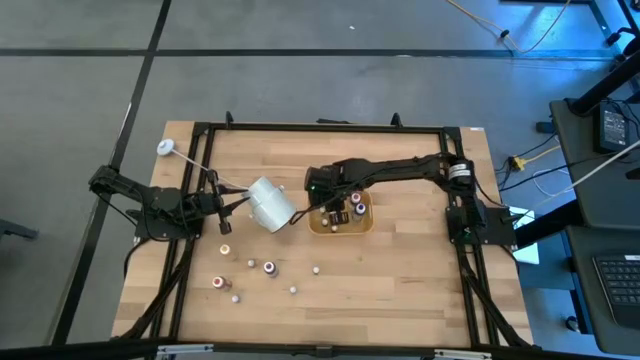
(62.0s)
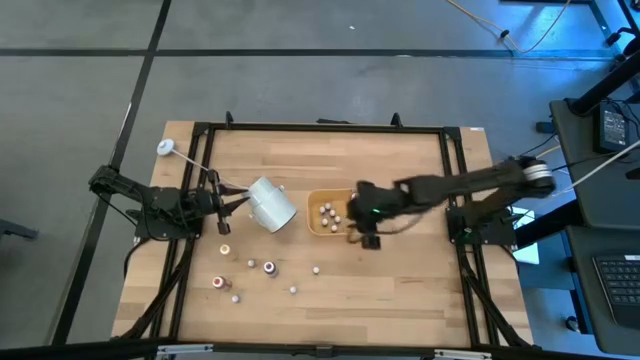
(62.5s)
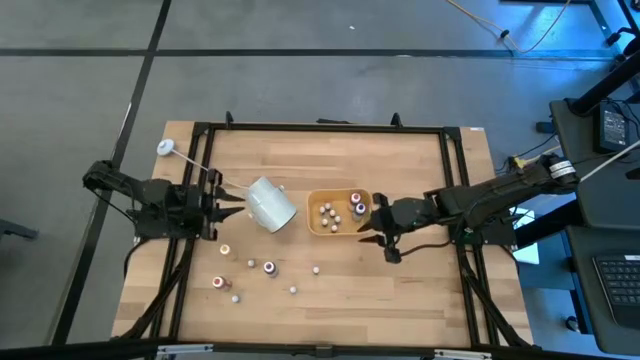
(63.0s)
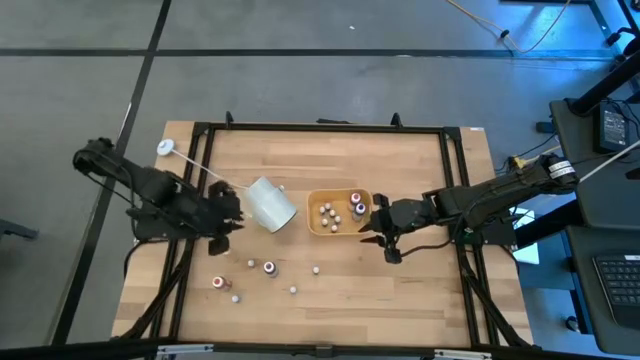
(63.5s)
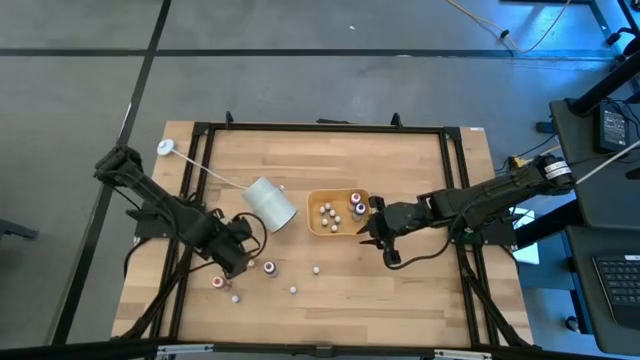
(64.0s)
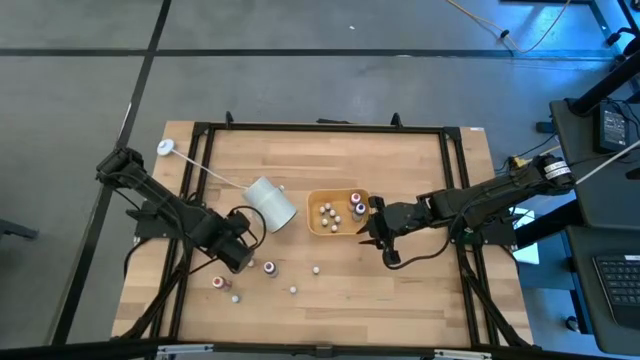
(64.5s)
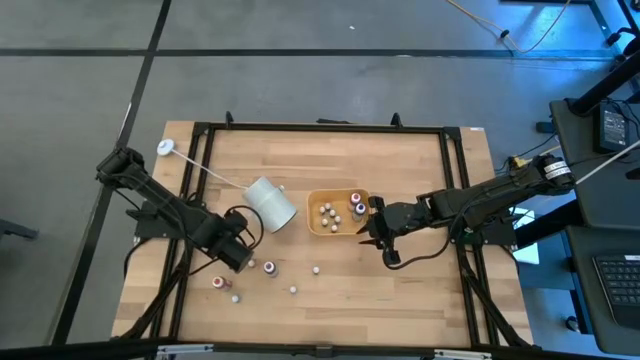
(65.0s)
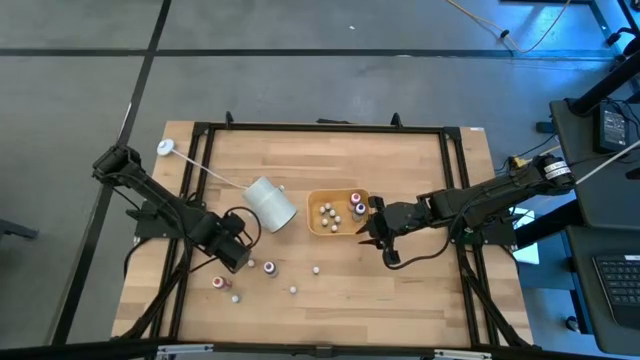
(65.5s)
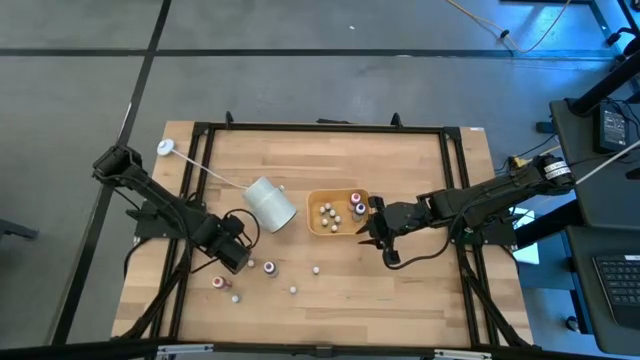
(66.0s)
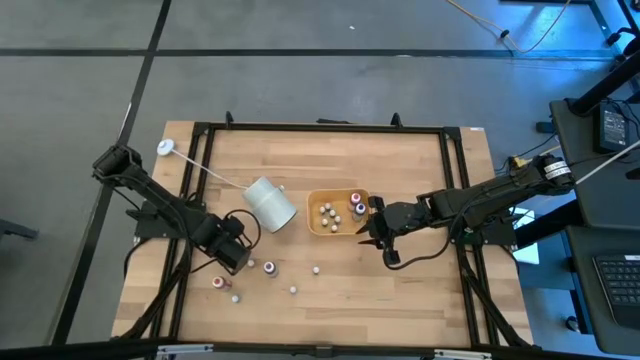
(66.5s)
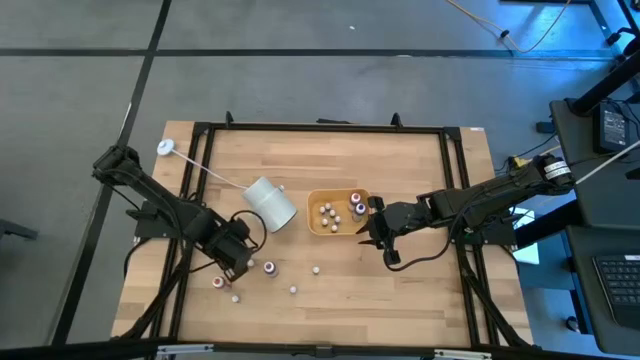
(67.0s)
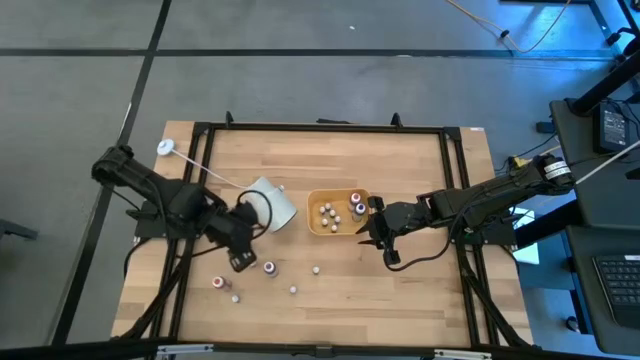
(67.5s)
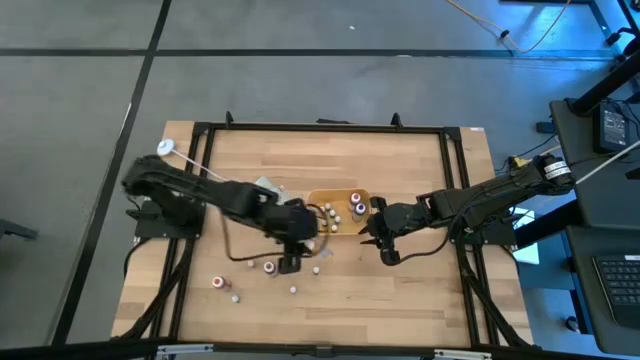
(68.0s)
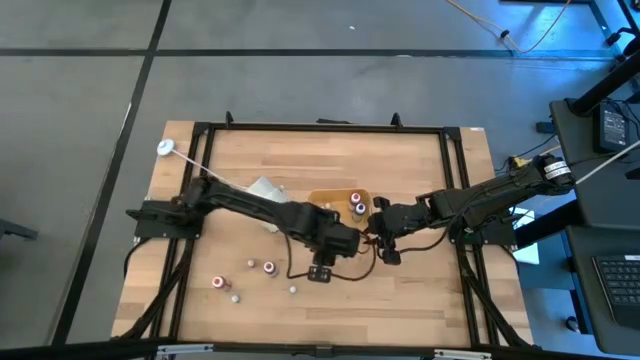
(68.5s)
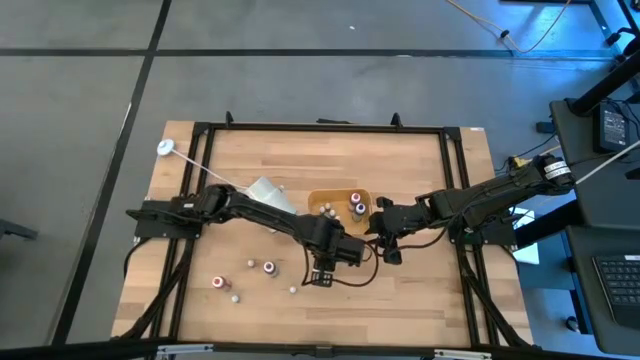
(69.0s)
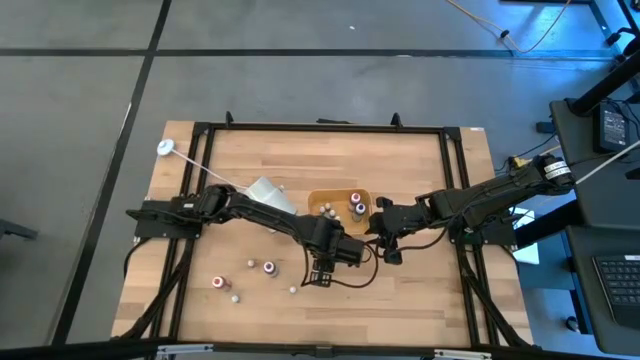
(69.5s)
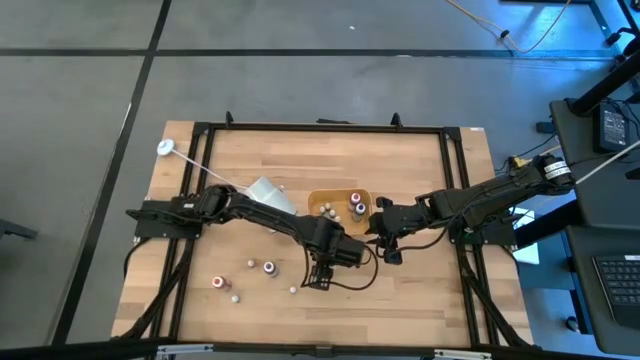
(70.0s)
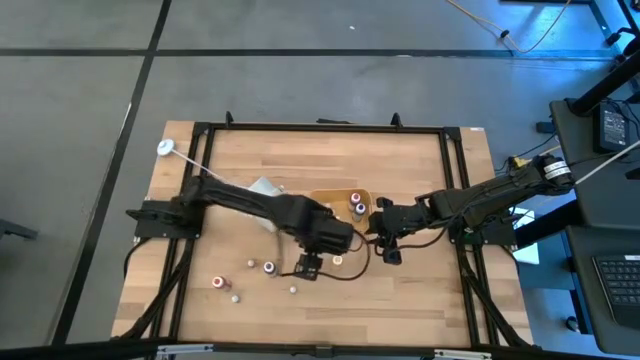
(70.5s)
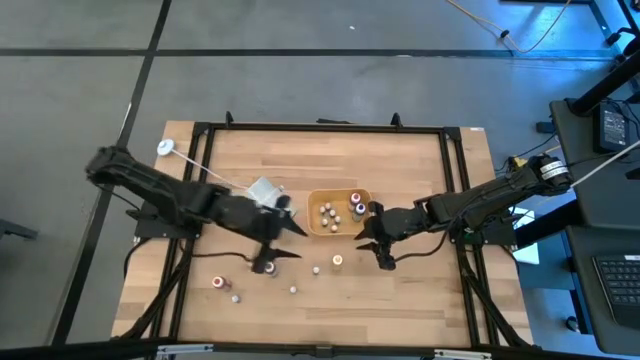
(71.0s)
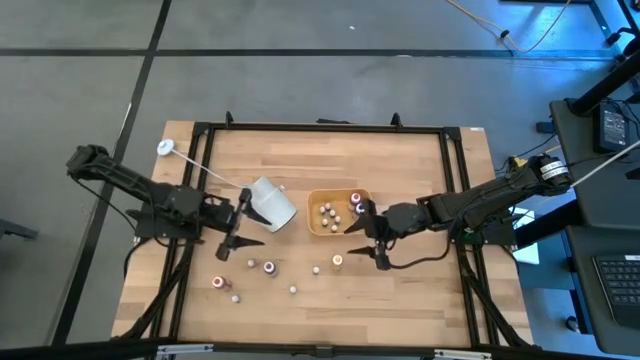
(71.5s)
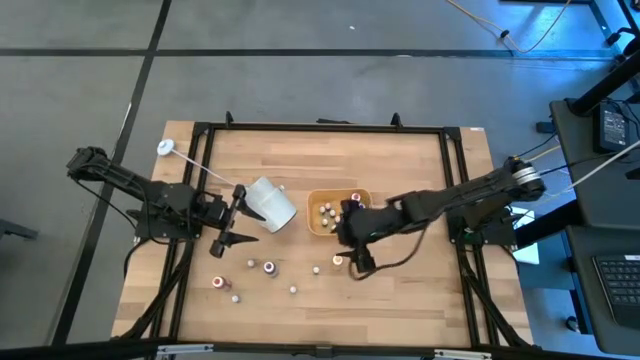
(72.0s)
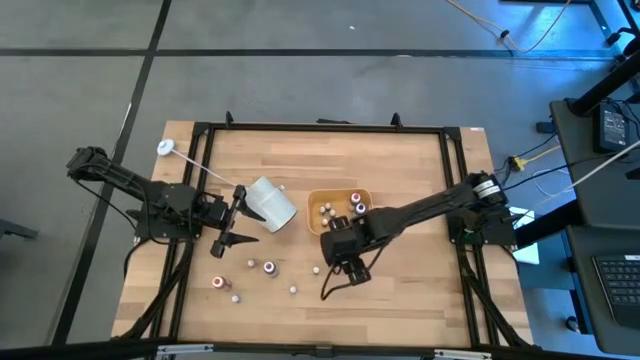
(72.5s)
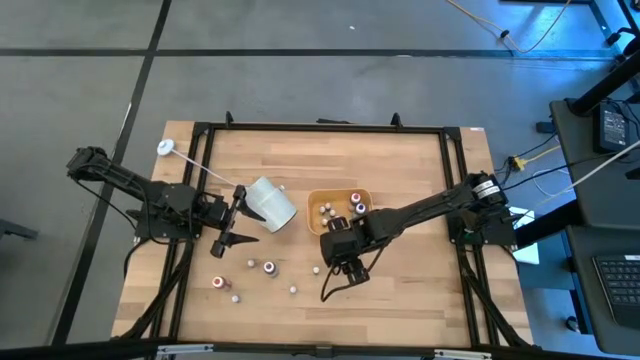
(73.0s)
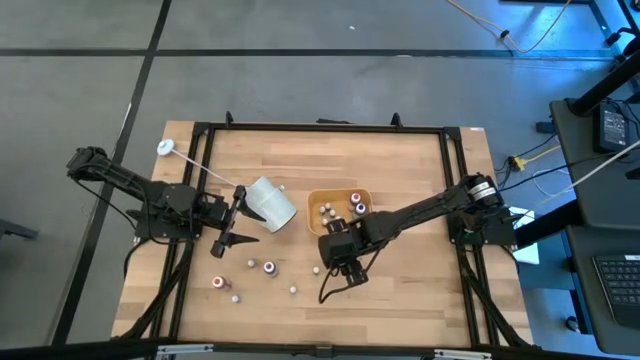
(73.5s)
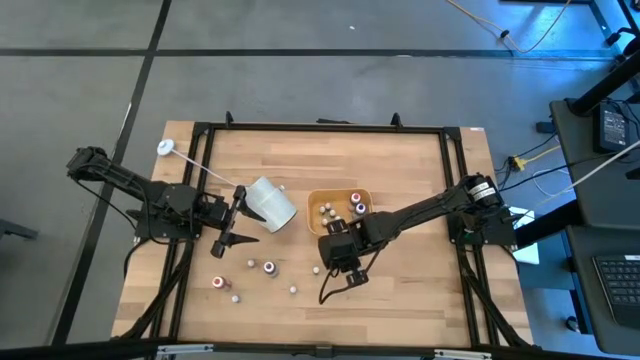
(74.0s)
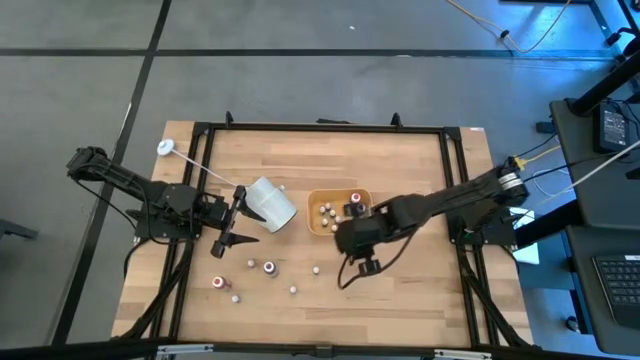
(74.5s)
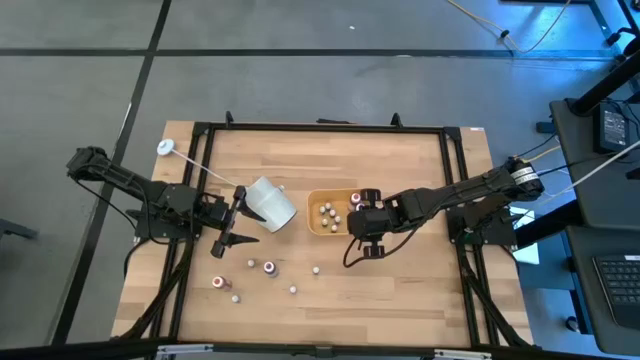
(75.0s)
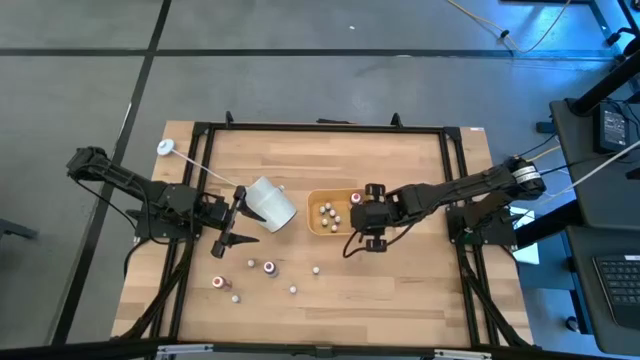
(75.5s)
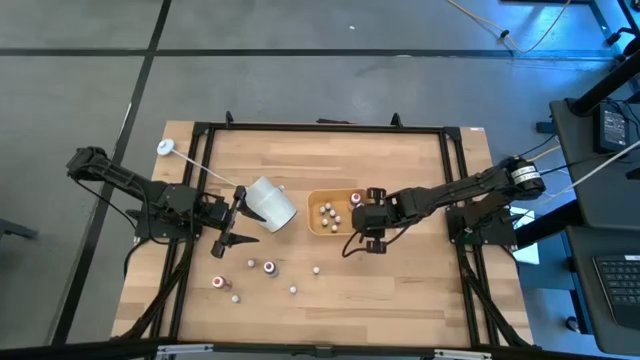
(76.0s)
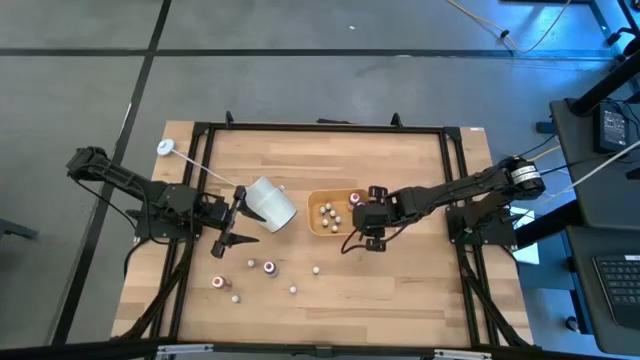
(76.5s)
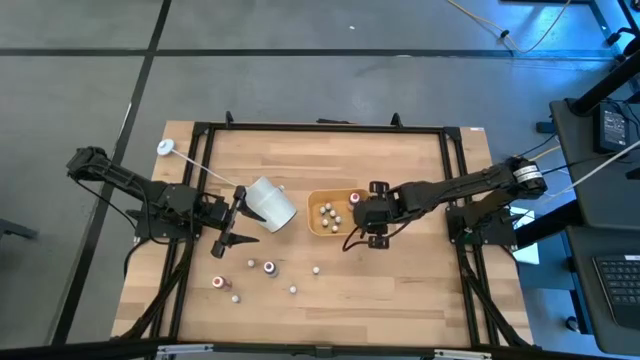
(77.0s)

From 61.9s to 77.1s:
Task: Pick & Place food coloring
Put the large yellow food coloring bottle into the yellow bin

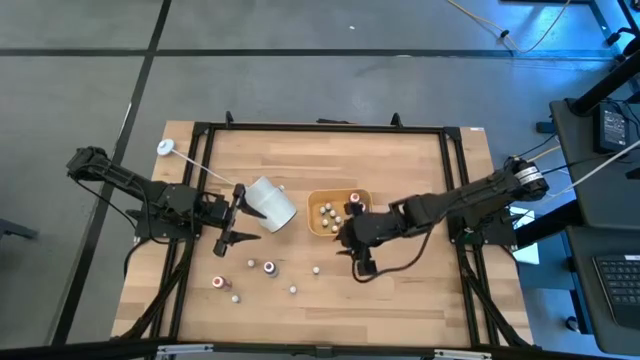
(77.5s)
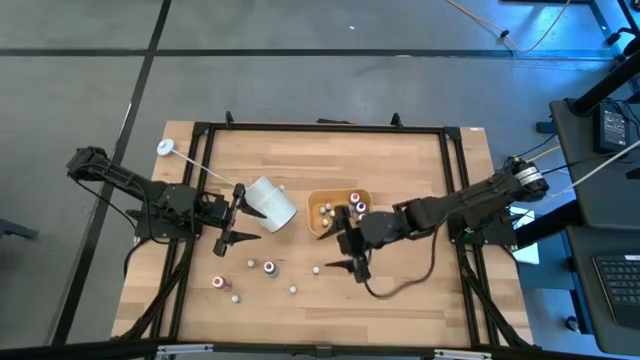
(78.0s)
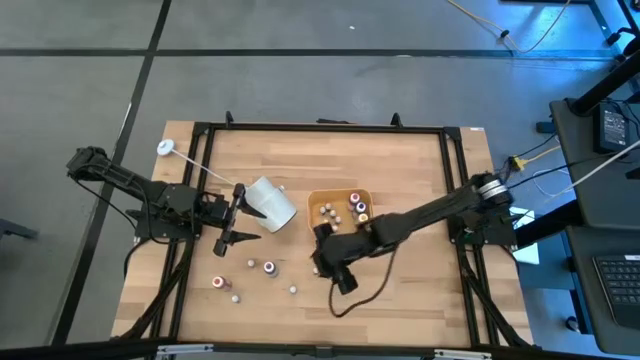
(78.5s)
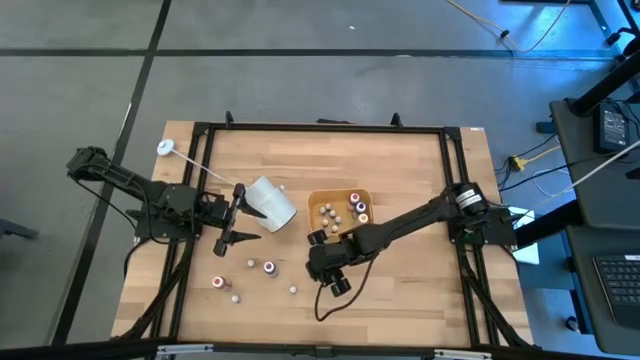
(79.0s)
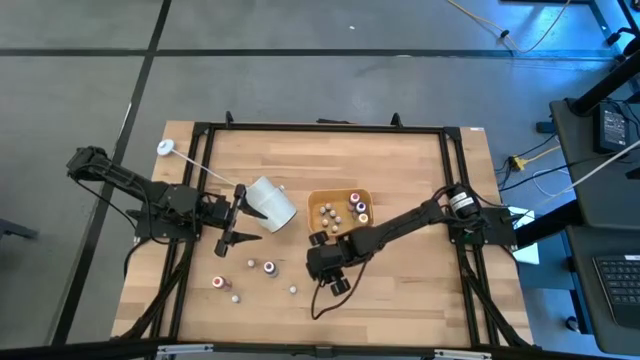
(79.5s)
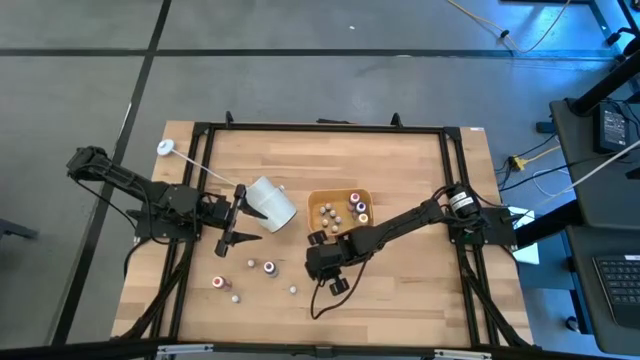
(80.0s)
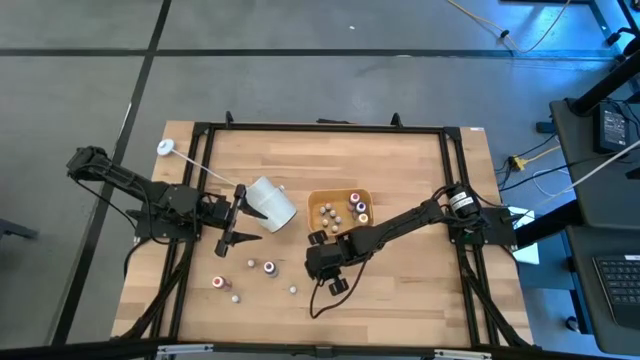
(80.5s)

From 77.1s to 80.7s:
Put the small green food coloring bottle into the yellow bin

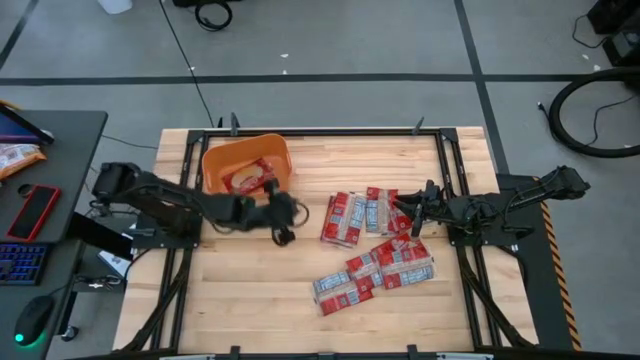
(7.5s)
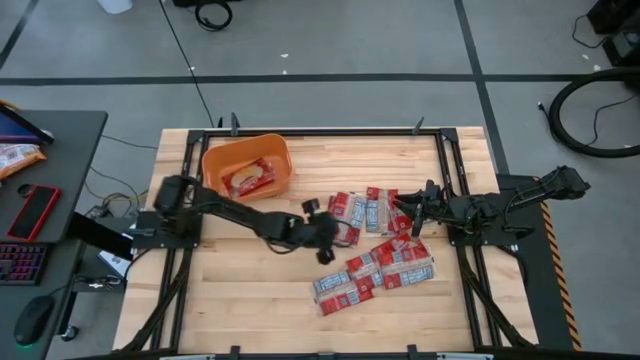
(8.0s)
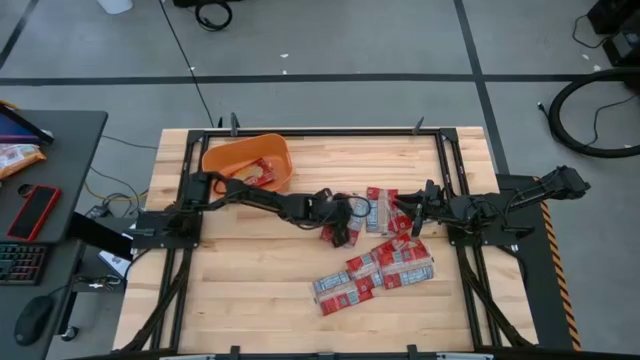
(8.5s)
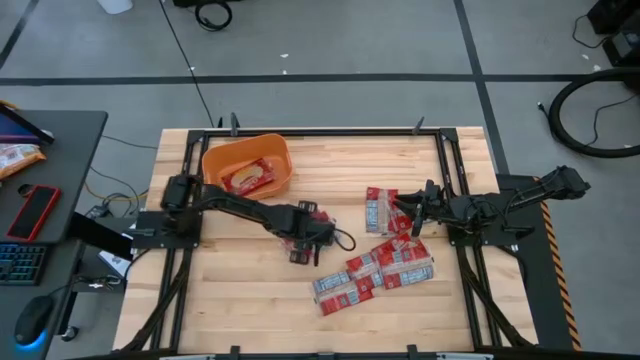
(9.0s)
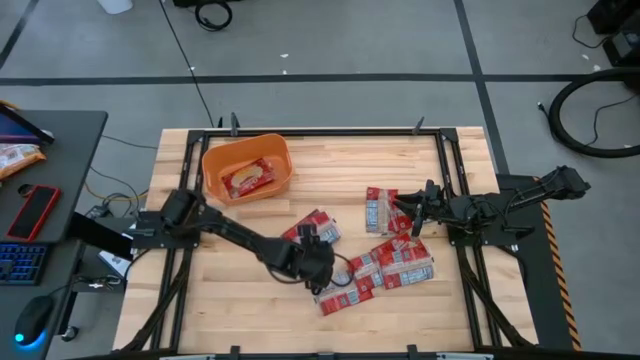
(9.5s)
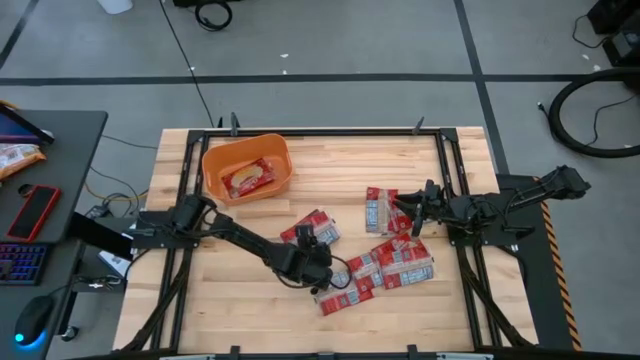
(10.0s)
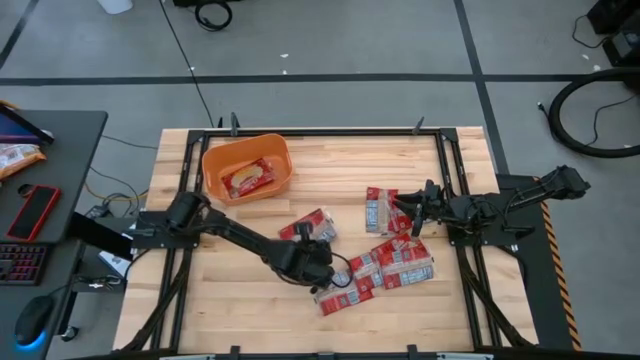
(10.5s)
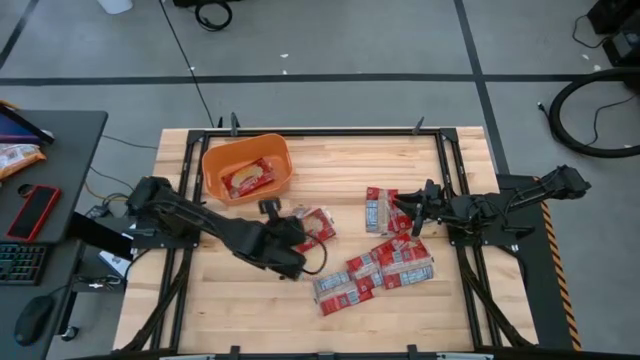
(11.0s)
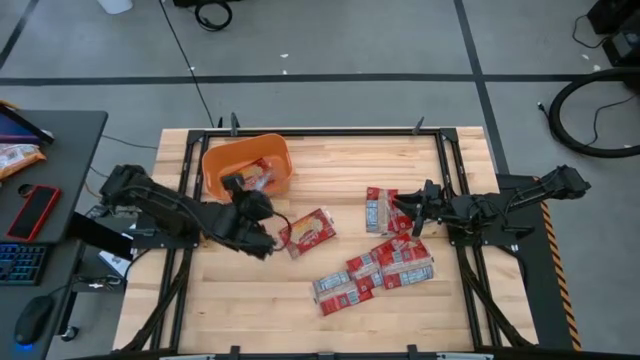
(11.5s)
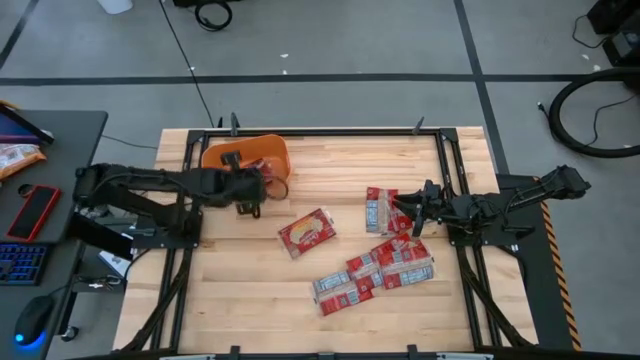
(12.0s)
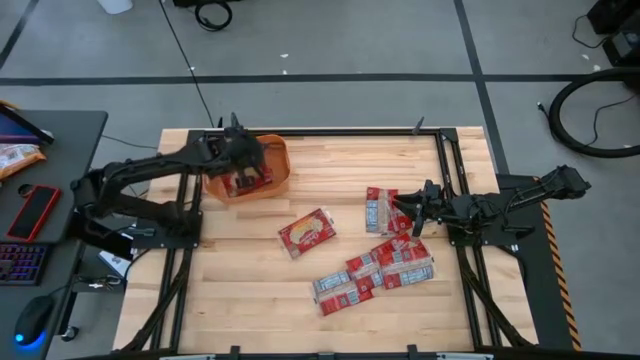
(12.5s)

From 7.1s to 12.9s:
Task: Sort popcorn bags into baskets
Put the red popcorn bag into the orange bin
